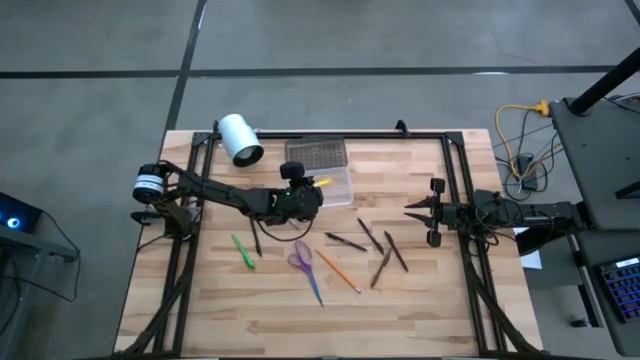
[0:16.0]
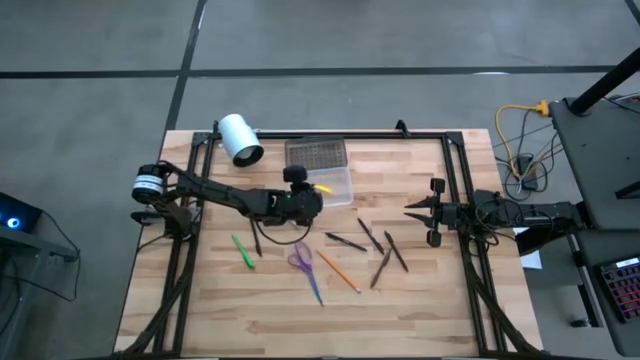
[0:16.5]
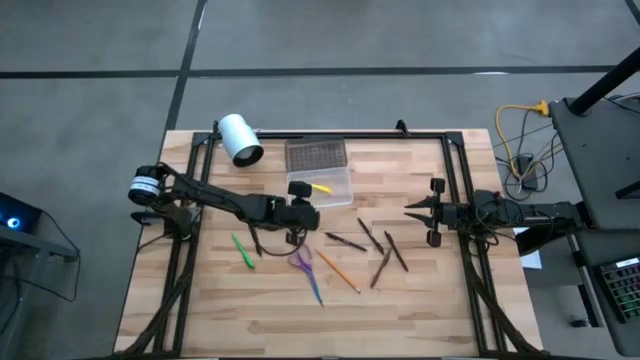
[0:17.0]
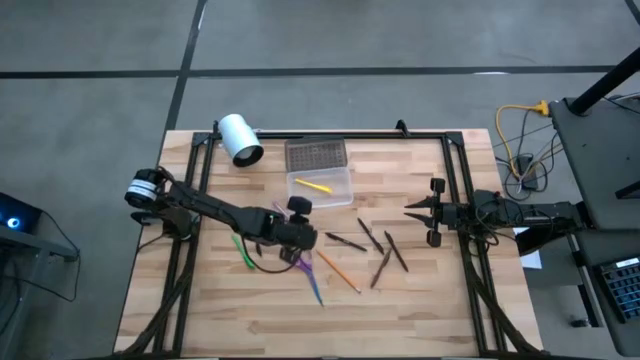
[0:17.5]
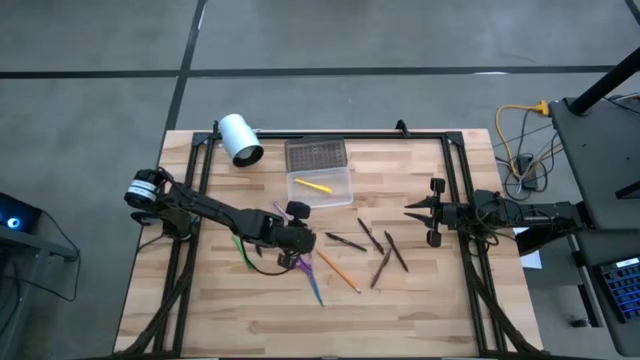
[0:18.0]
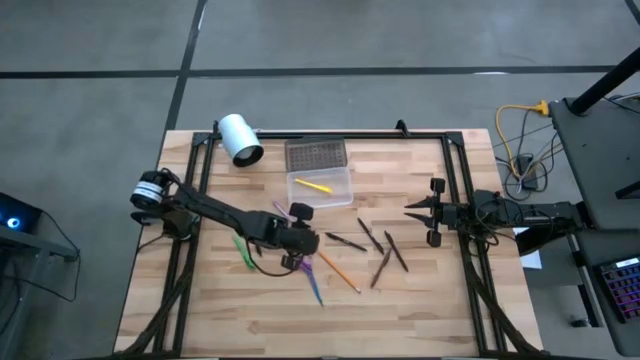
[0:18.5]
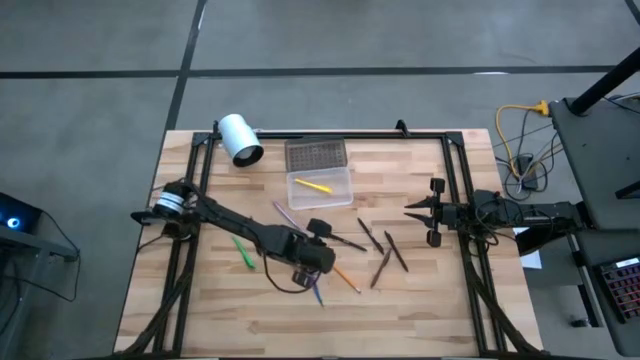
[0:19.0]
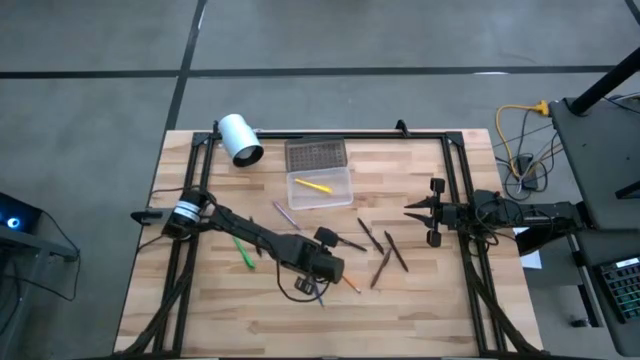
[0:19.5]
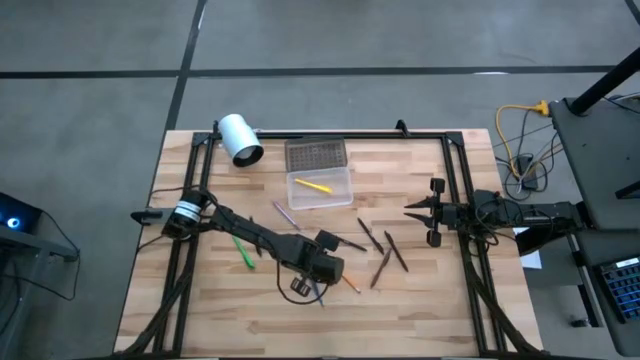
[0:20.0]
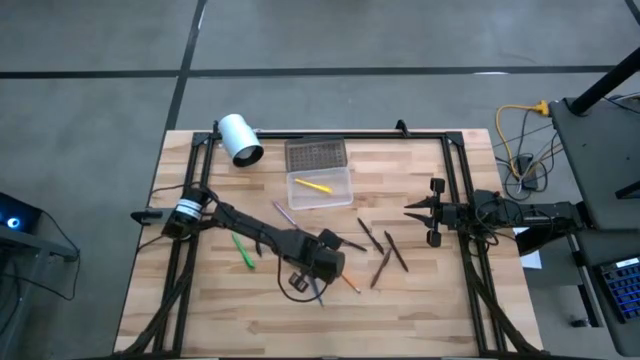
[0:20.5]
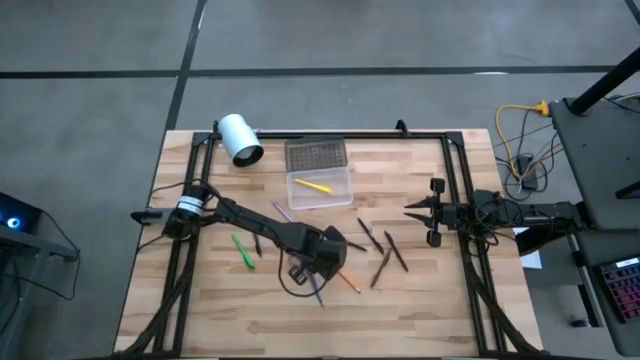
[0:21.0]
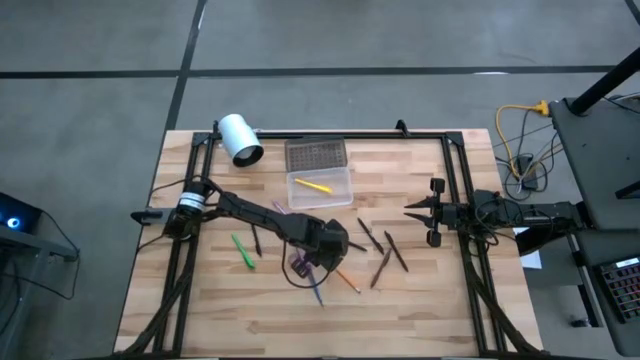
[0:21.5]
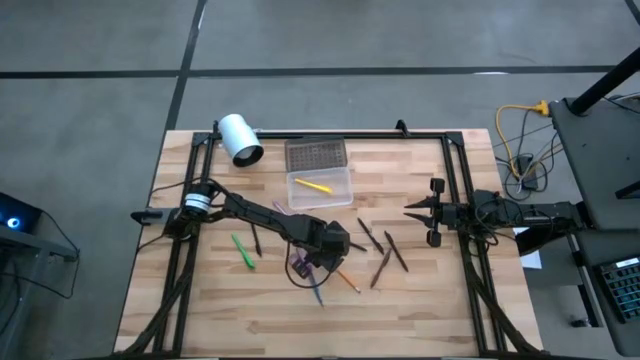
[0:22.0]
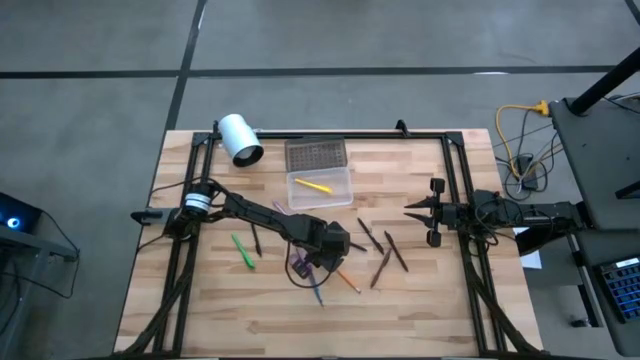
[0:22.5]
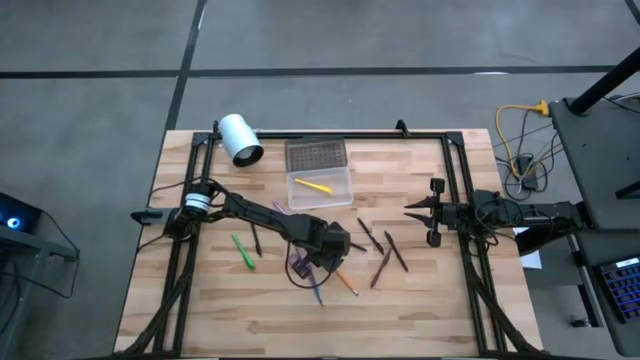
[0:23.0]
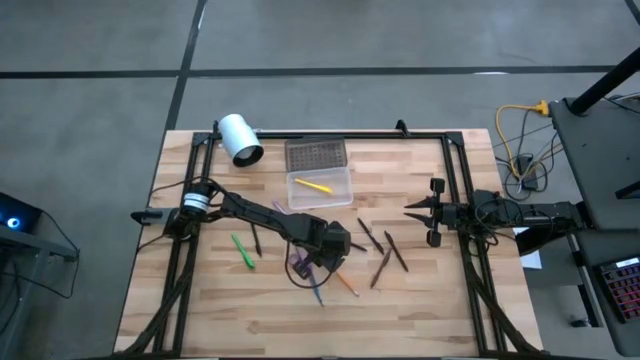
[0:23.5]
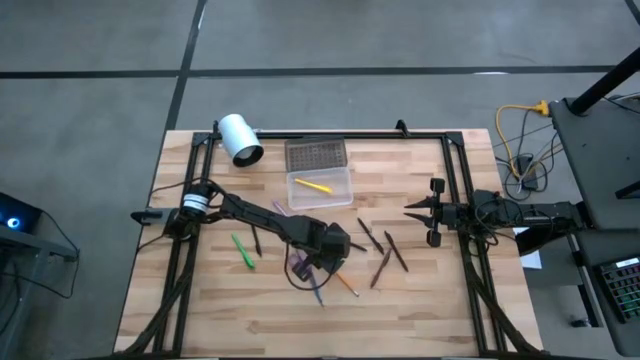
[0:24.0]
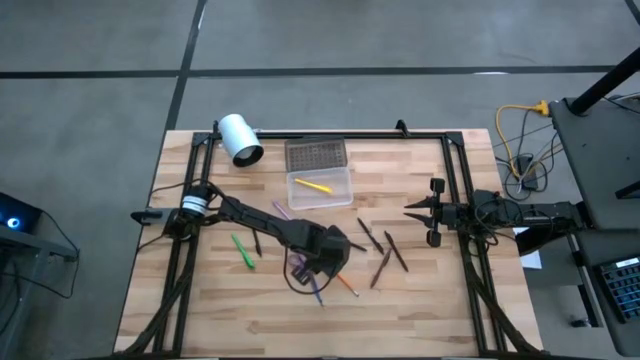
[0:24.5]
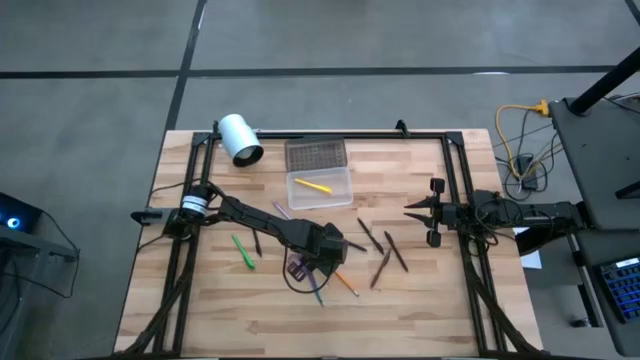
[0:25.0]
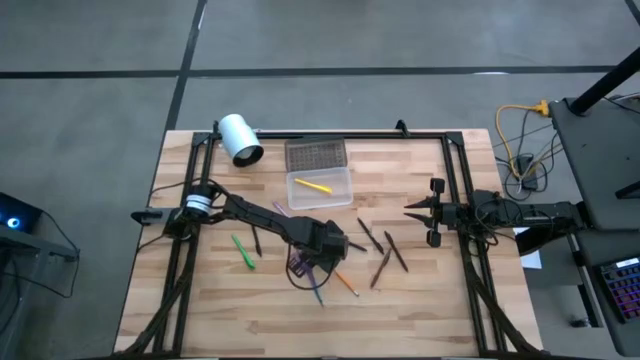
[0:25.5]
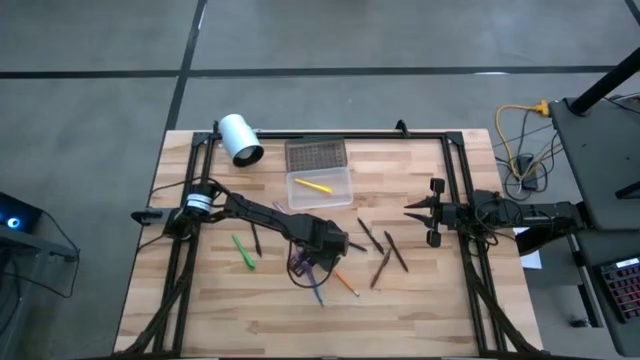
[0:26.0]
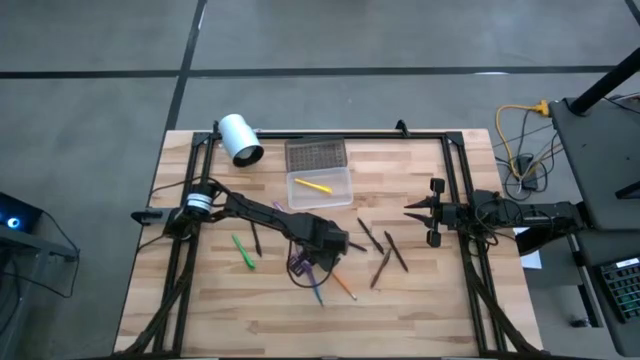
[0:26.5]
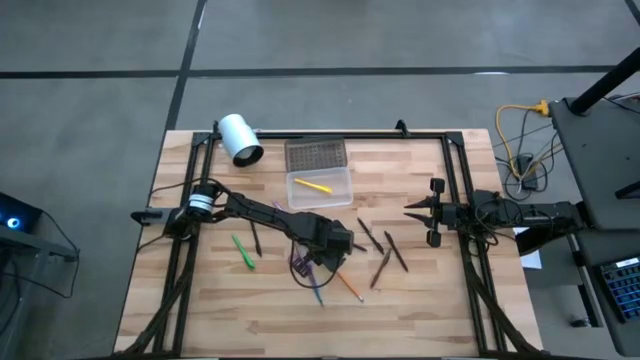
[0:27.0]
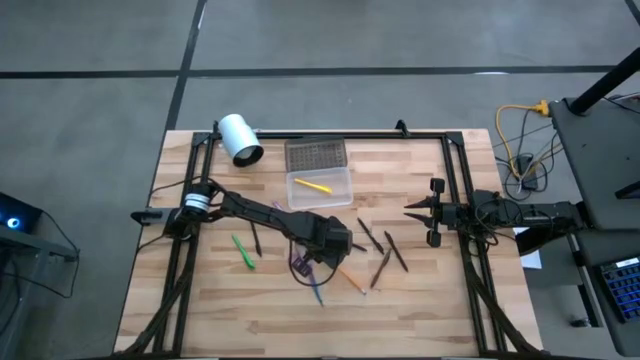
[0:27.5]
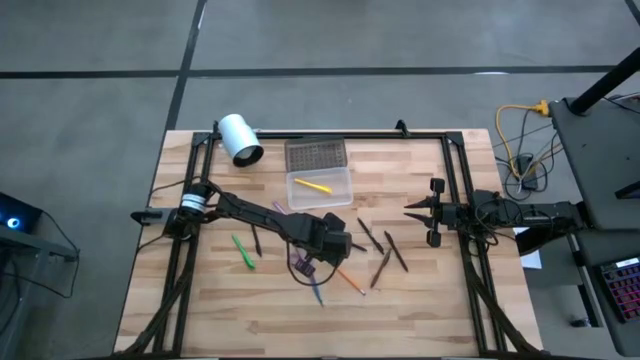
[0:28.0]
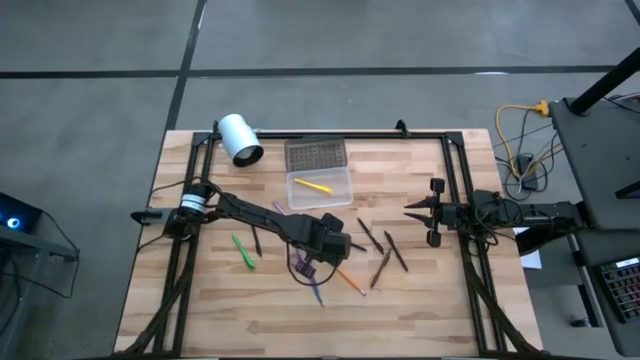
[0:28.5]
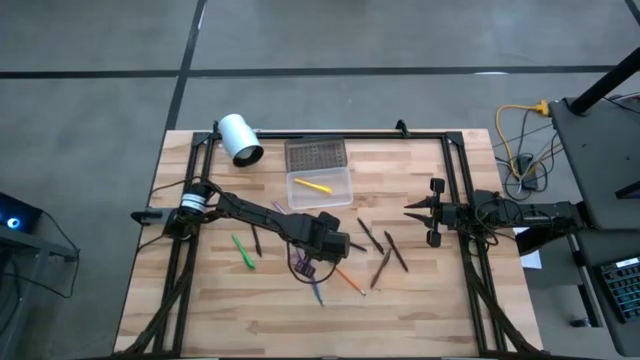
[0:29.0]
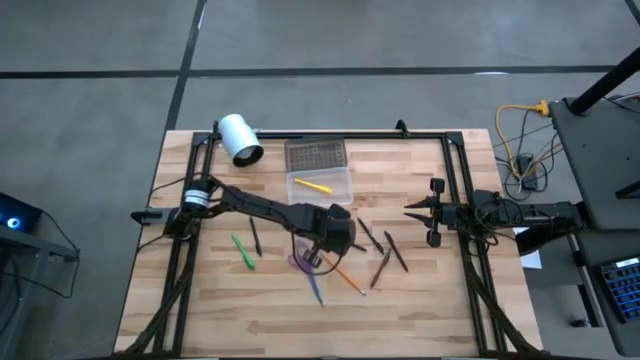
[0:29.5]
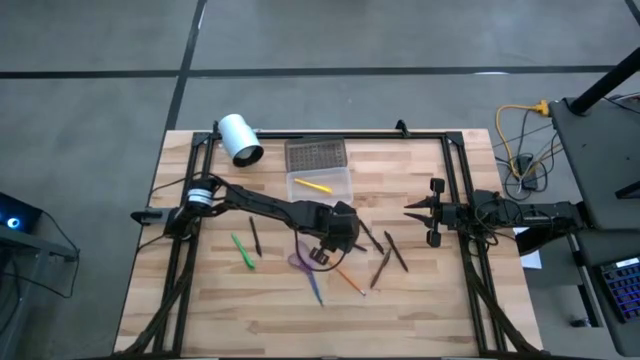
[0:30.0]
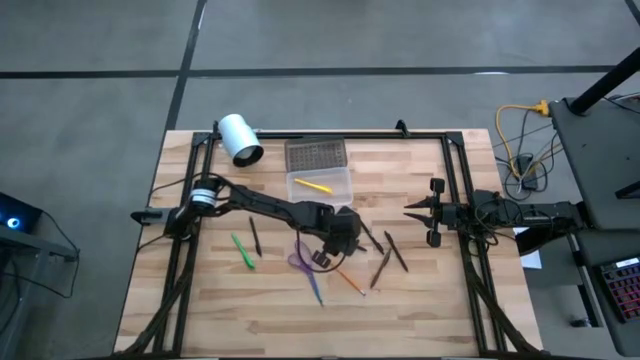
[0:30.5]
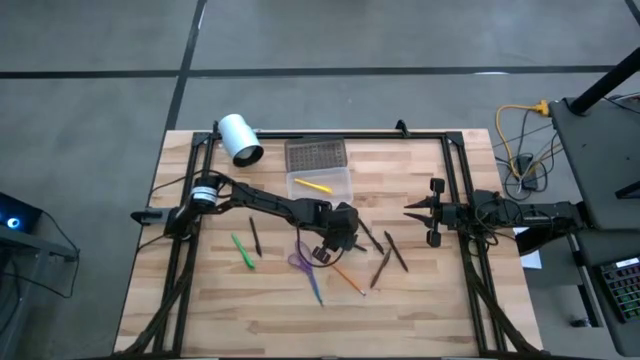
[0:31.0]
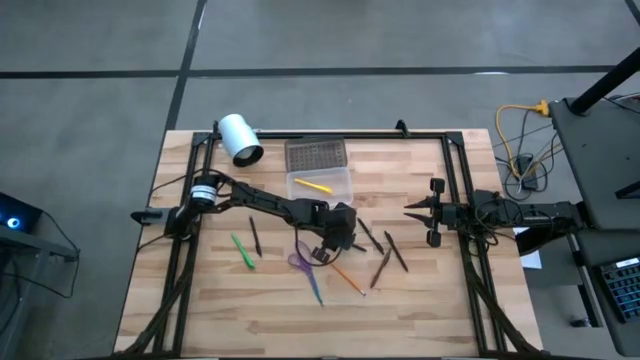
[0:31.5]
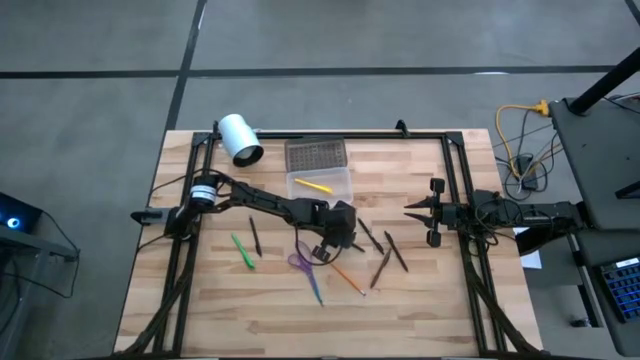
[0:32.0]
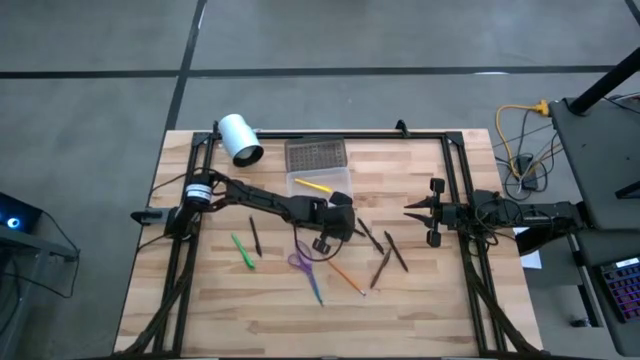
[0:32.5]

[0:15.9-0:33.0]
Task: Pick & place school supplies into a supply box
Put the violet pen into the supply box

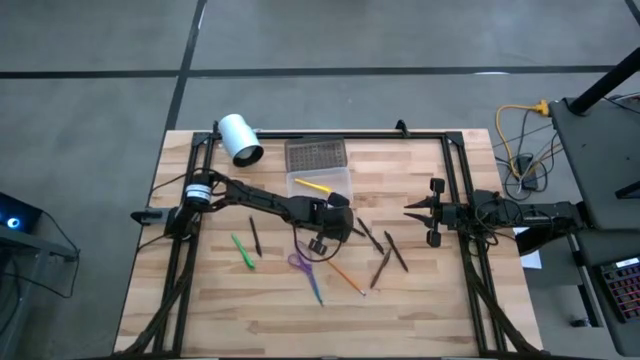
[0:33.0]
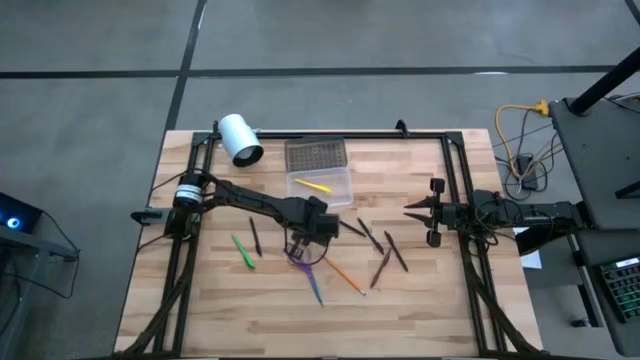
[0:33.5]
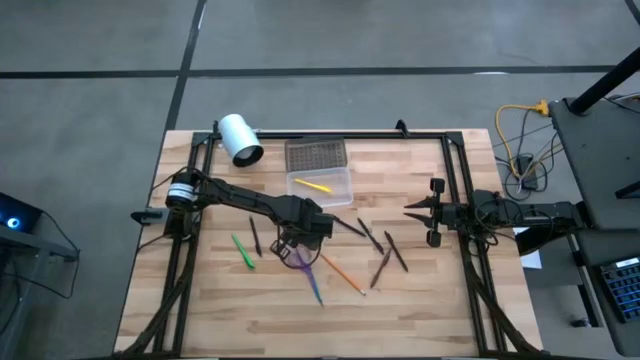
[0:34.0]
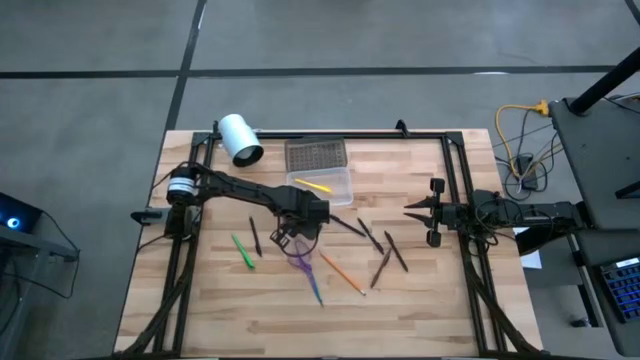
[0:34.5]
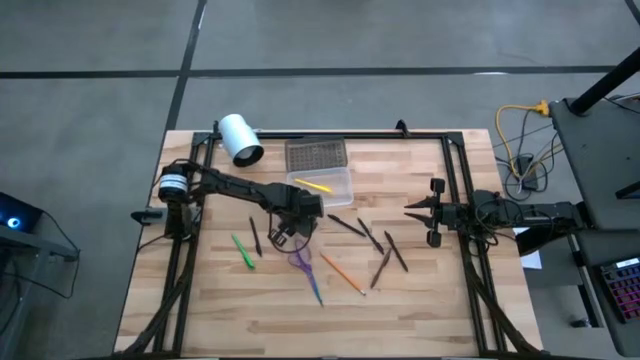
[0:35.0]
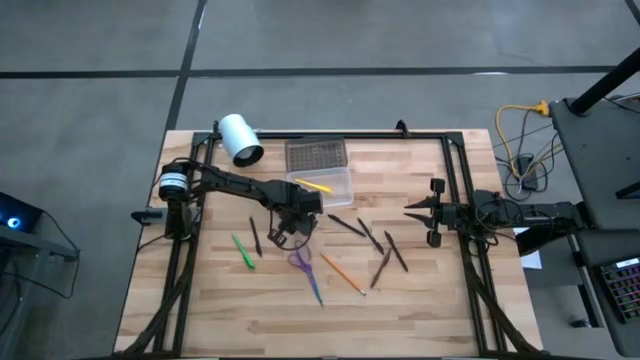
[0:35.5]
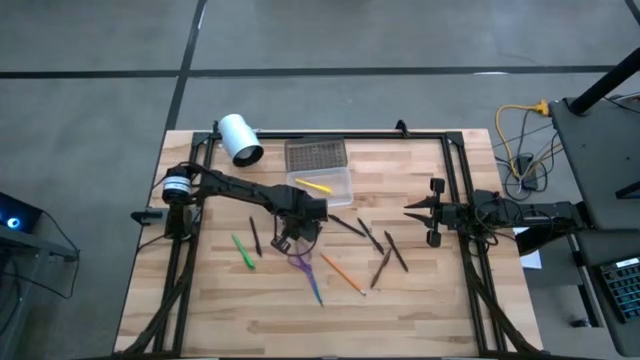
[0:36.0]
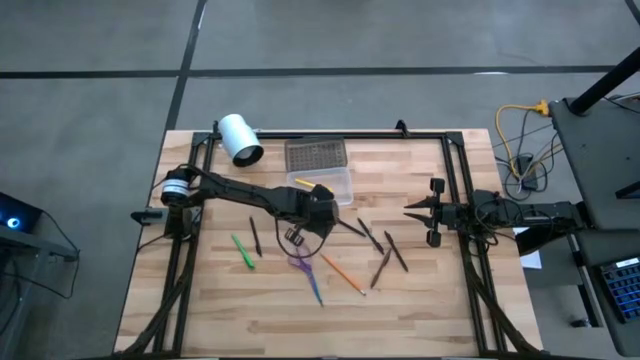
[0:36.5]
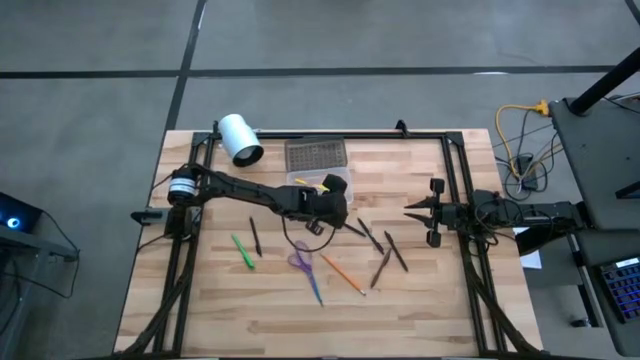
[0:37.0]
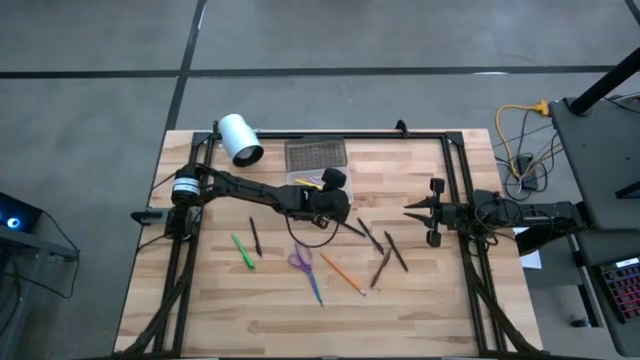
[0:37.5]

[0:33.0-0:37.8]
Put the violet pen into the supply box
